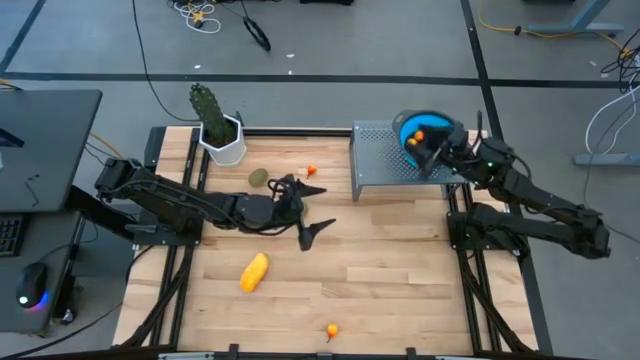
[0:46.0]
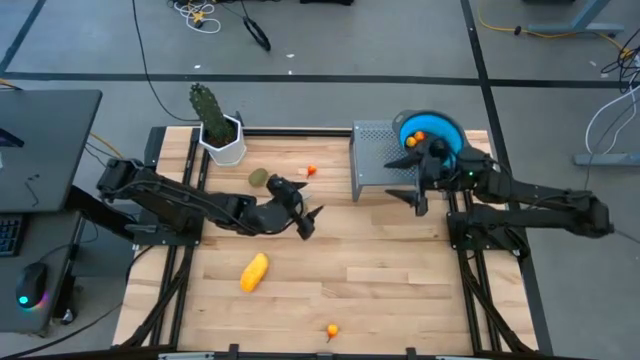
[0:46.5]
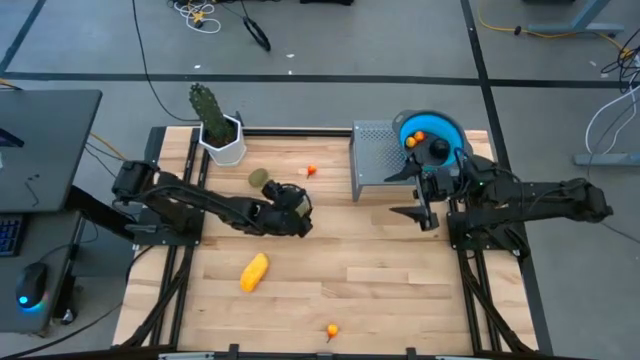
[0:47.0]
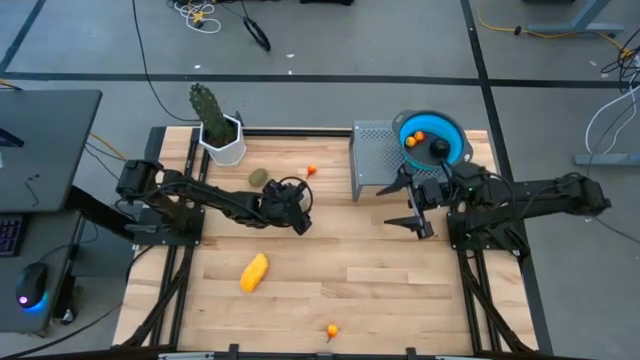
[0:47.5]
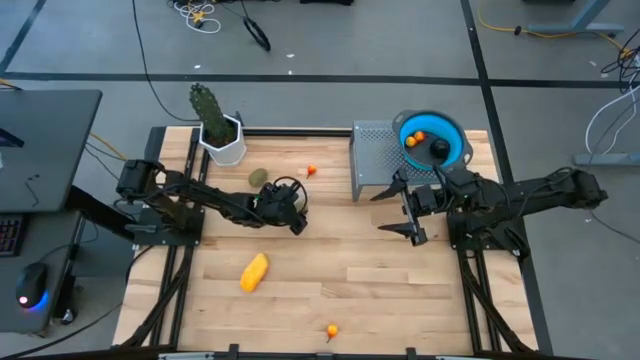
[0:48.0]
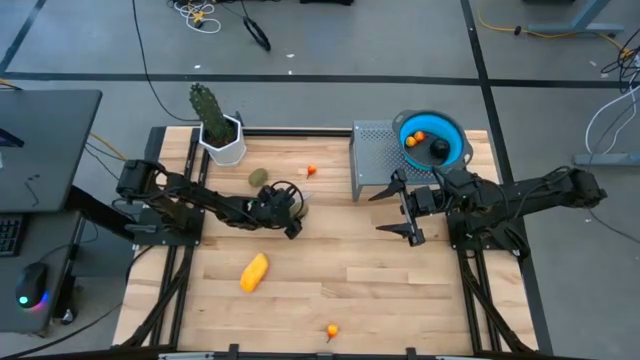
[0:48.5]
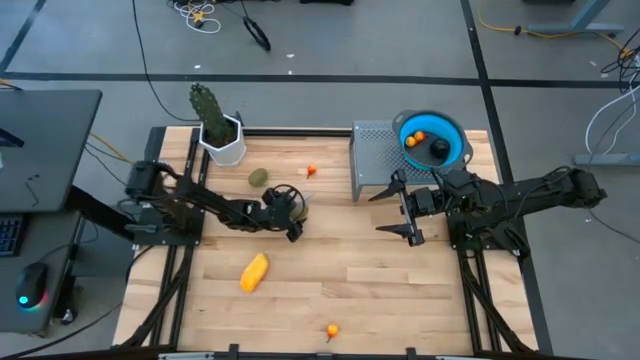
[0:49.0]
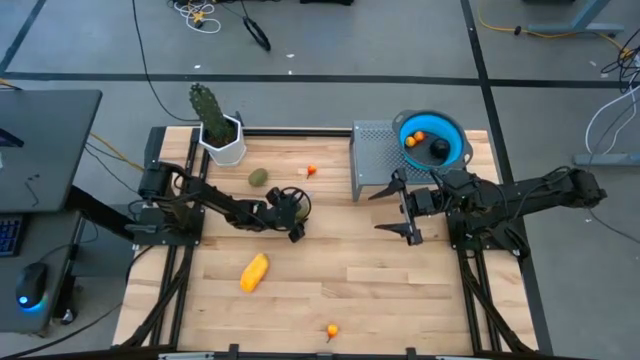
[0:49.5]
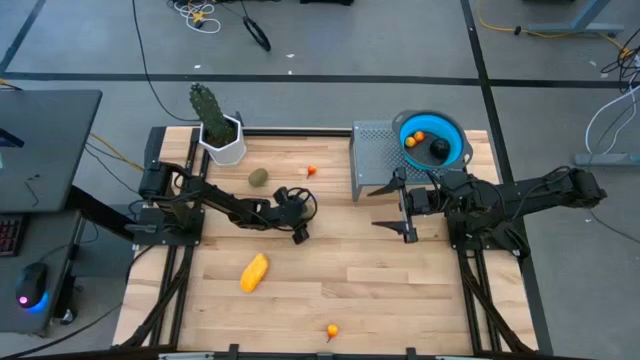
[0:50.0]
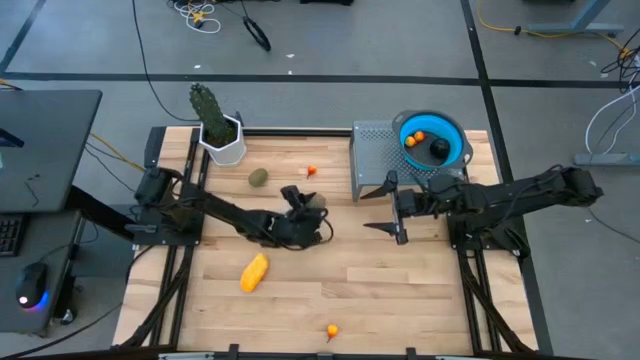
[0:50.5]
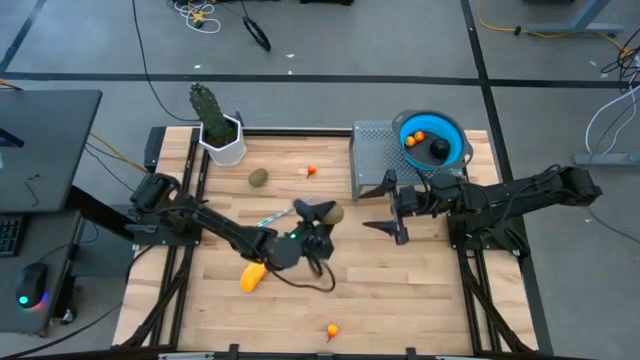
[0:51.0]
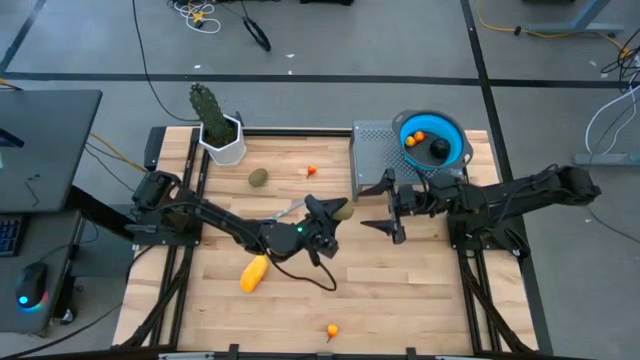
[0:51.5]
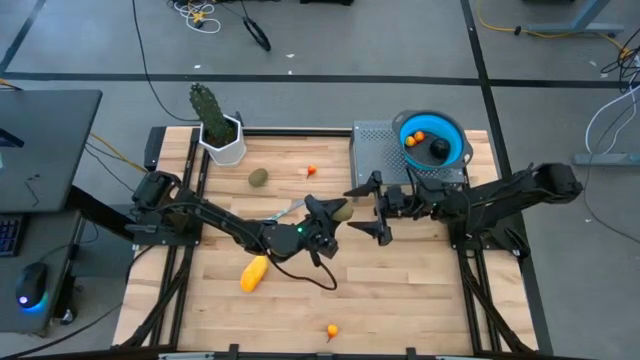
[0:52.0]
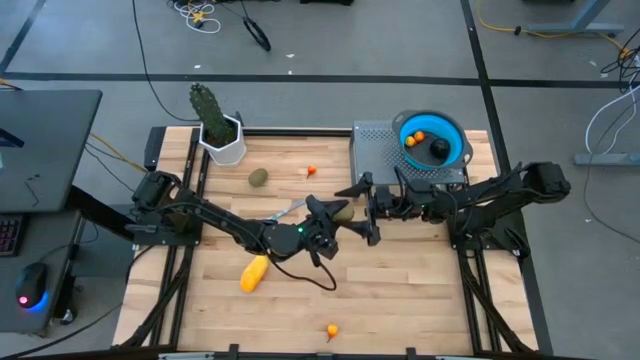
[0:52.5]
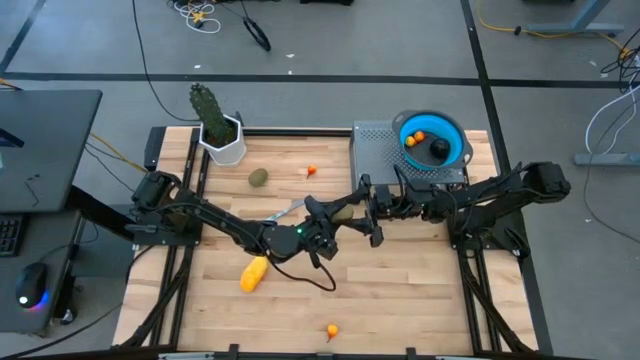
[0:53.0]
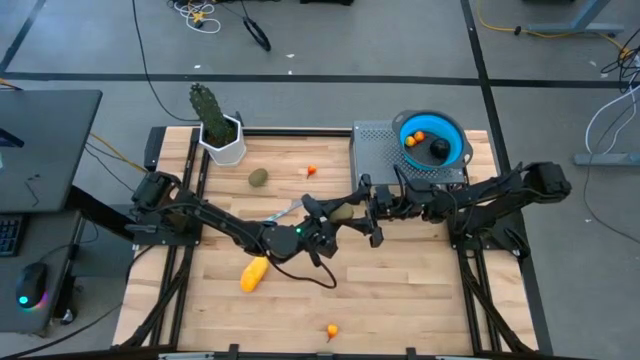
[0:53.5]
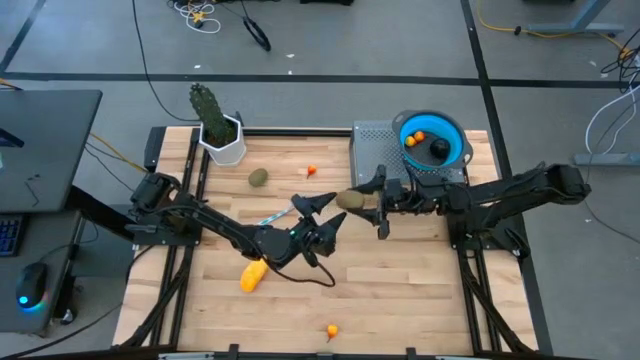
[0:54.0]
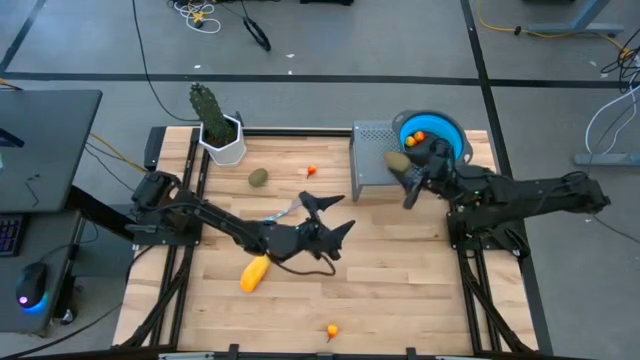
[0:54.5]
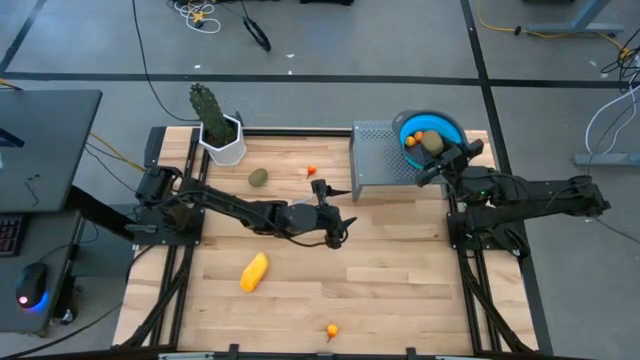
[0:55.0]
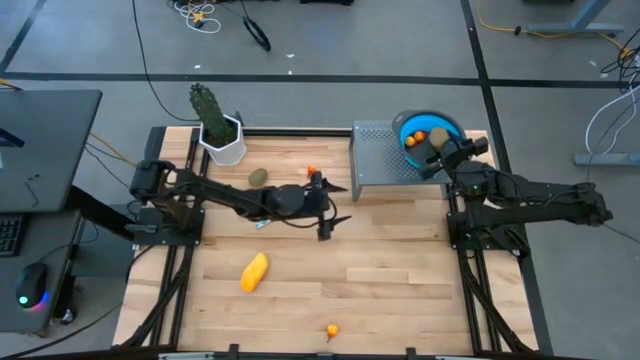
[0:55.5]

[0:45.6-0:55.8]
Task: Pick & Place Fruit
Put the kiwi into the blue strainer bowl on the shelf

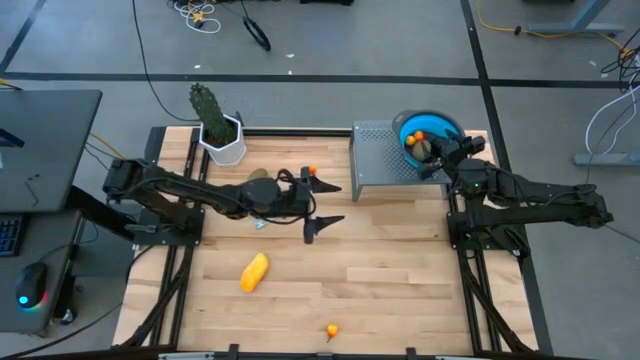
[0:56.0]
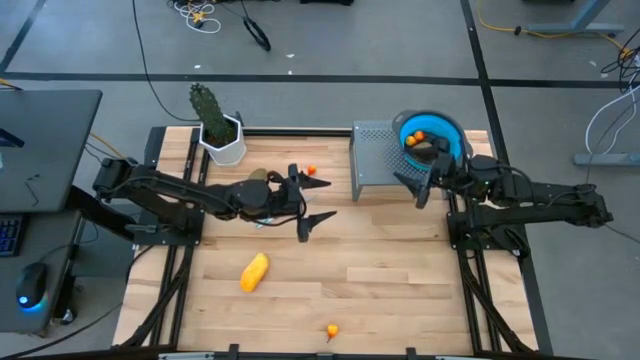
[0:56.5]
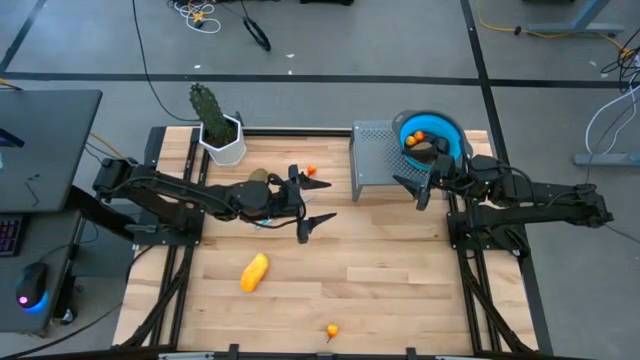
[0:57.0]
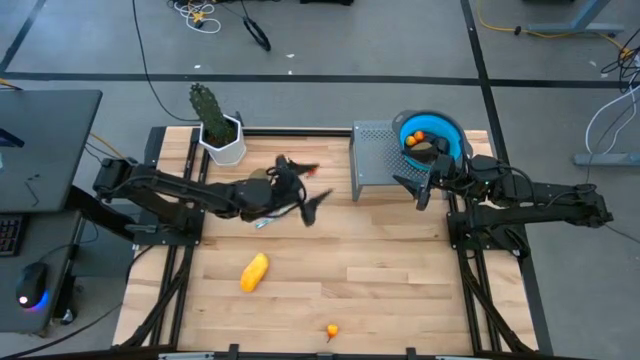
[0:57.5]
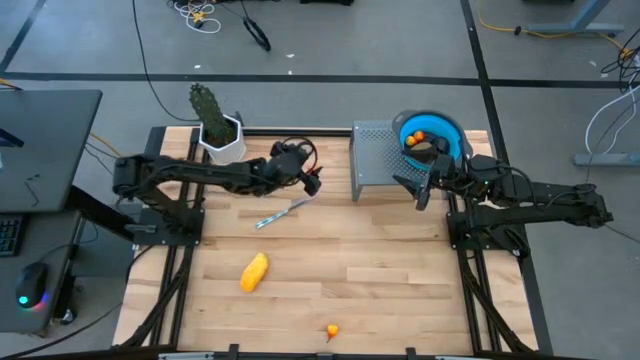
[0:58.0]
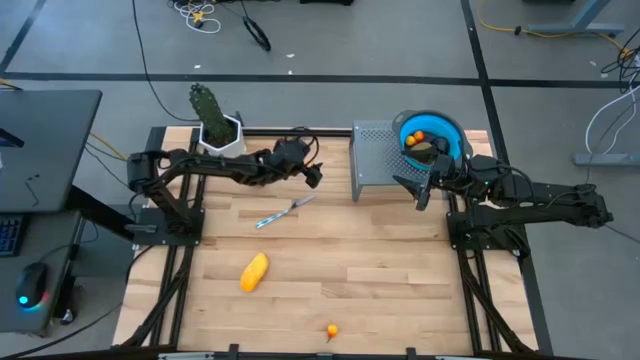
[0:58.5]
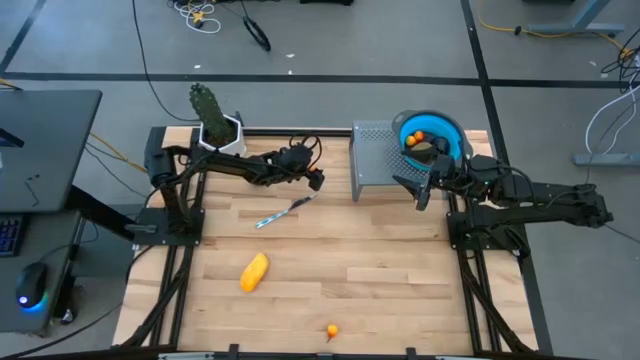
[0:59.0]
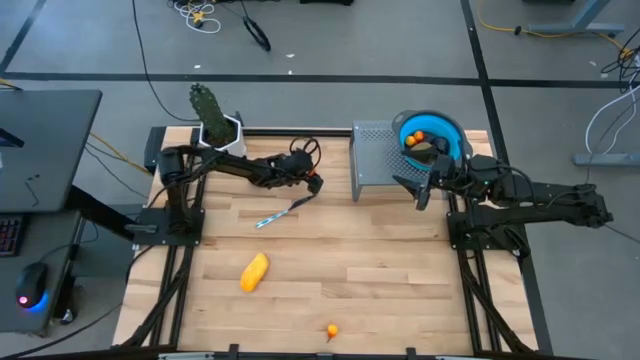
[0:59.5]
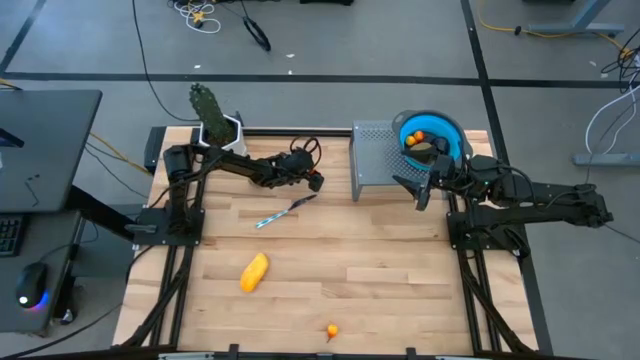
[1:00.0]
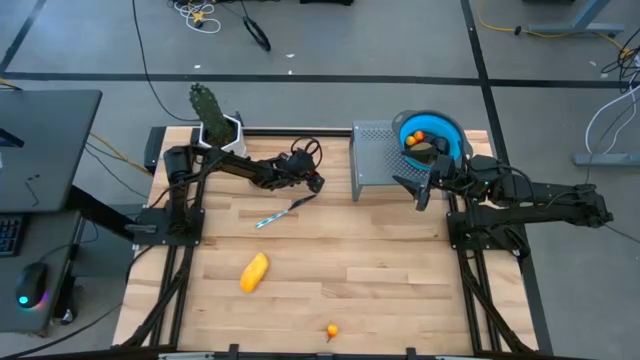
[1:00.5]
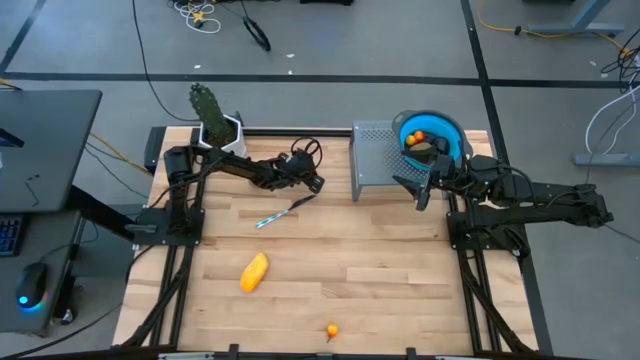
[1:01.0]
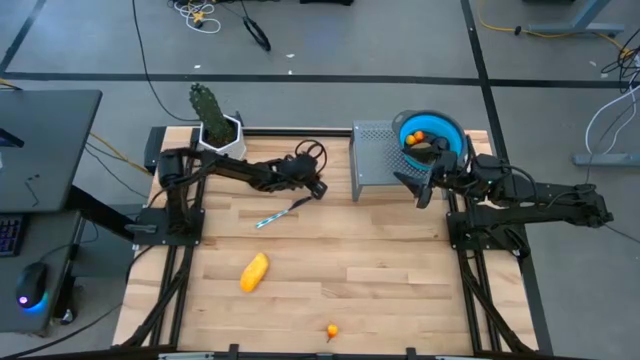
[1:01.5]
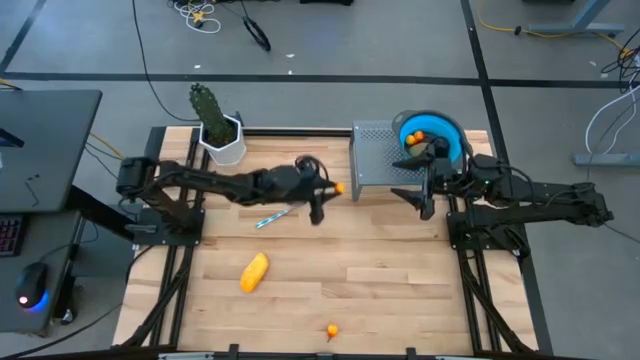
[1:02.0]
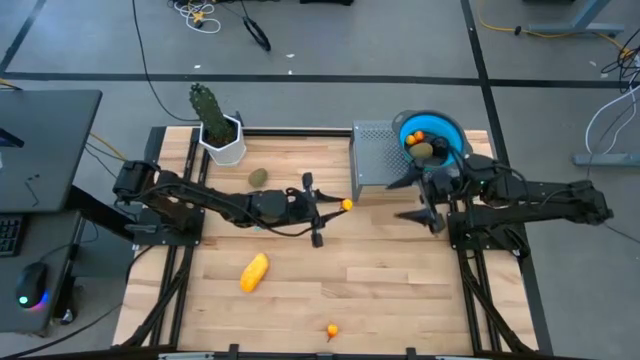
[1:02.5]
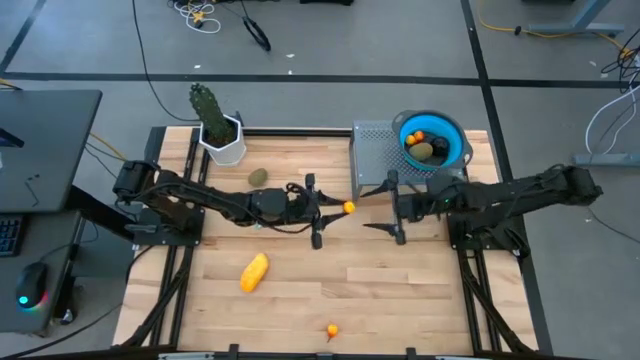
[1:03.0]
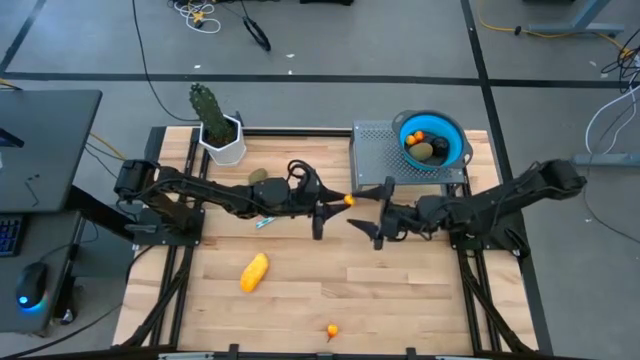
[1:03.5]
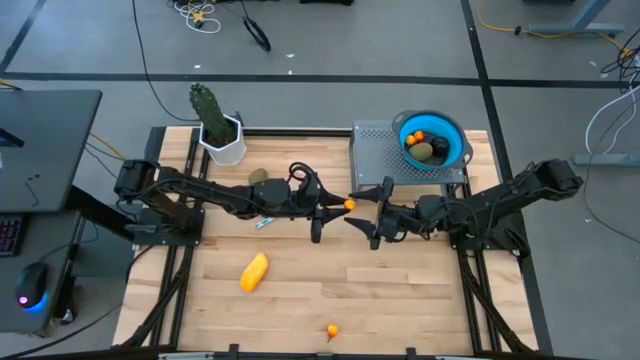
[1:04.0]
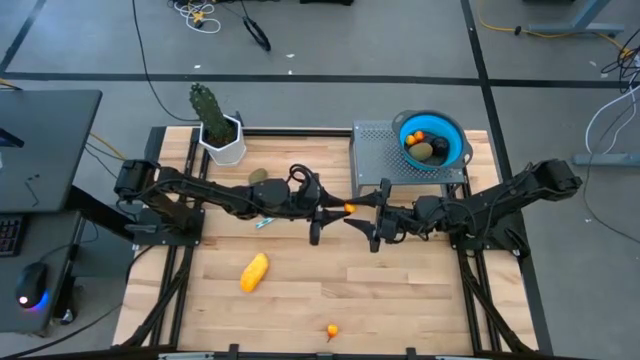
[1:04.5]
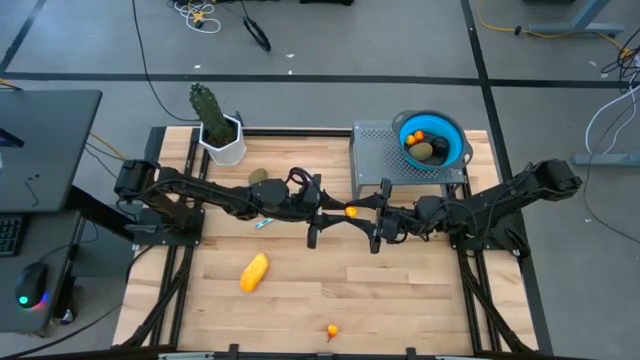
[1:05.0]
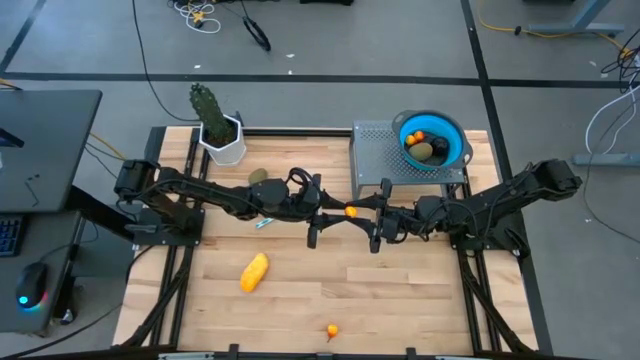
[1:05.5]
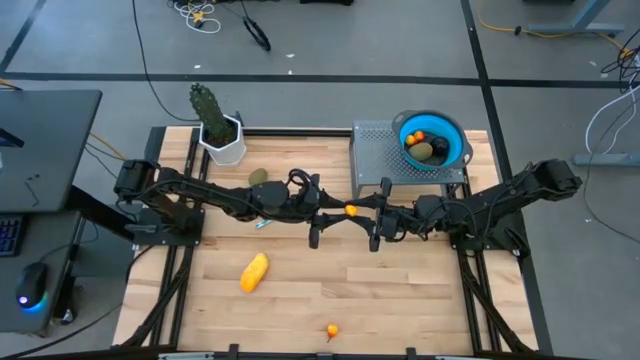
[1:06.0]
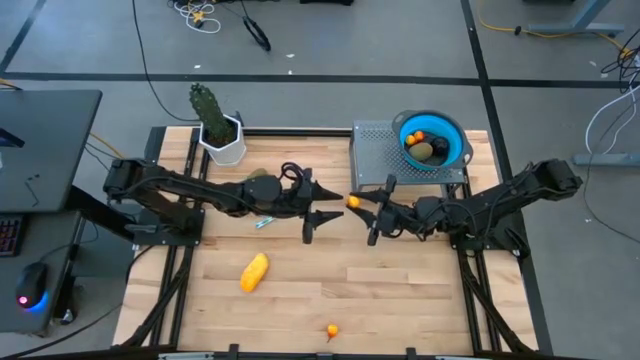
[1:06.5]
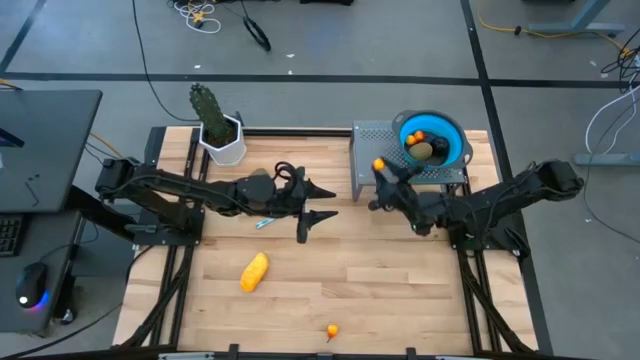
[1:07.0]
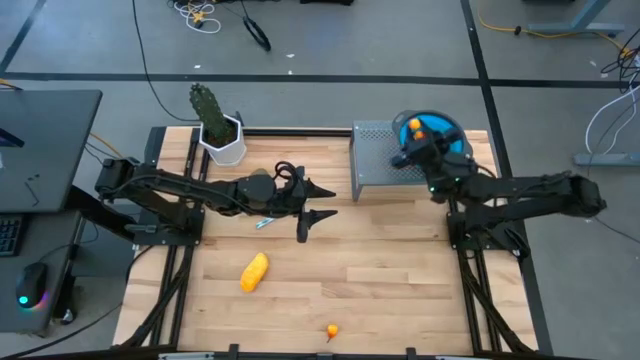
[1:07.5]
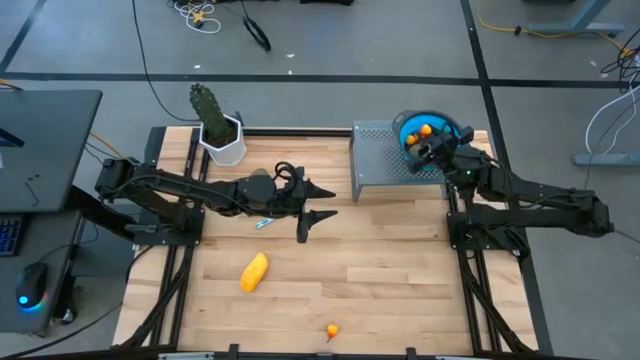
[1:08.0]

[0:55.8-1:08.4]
Put the pear into the blue strainer bowl on the shelf
